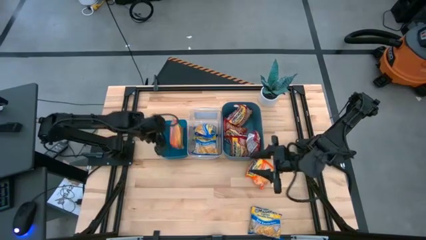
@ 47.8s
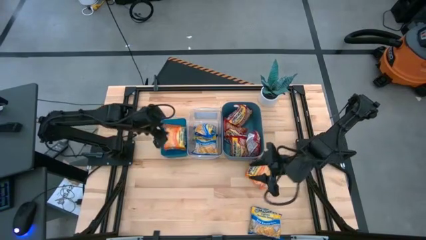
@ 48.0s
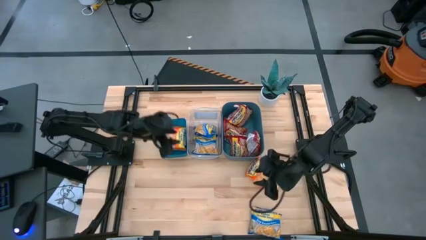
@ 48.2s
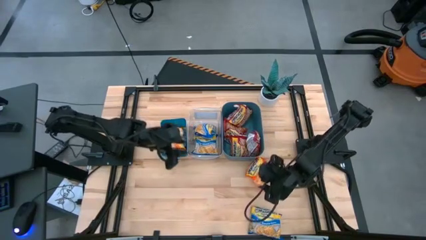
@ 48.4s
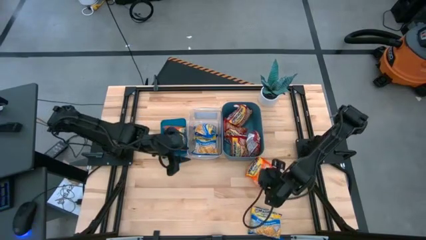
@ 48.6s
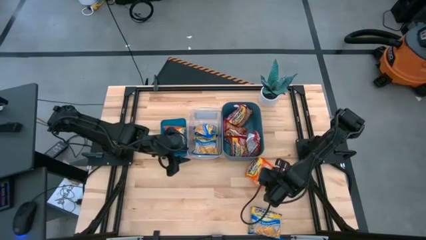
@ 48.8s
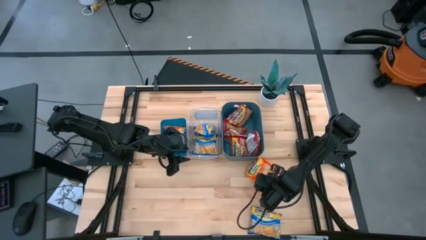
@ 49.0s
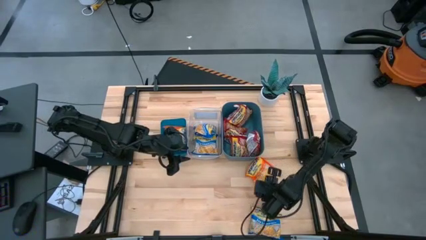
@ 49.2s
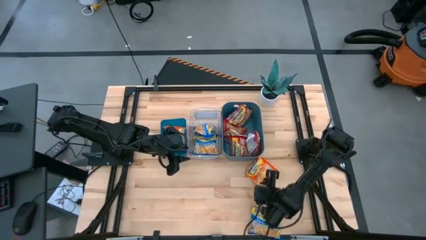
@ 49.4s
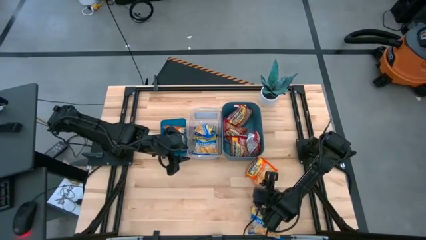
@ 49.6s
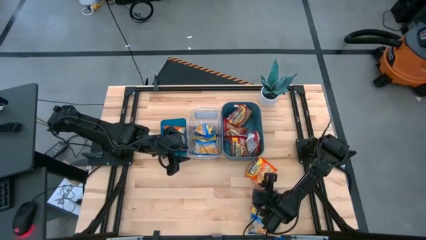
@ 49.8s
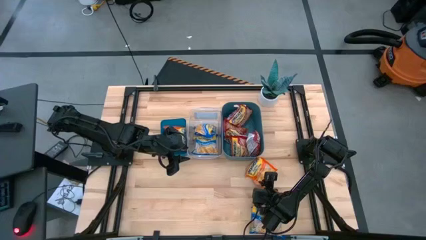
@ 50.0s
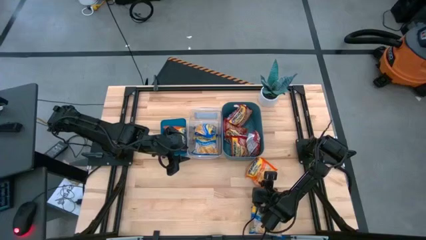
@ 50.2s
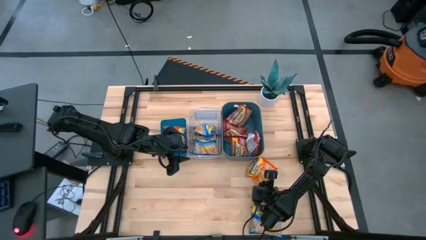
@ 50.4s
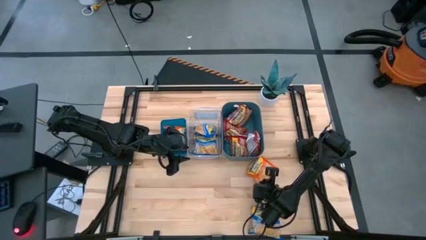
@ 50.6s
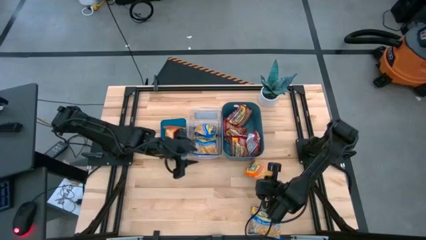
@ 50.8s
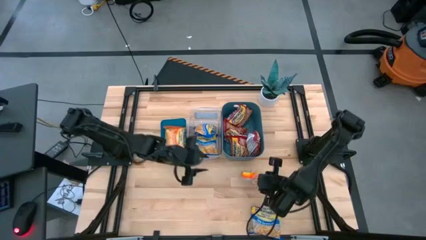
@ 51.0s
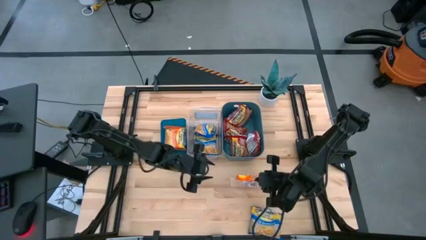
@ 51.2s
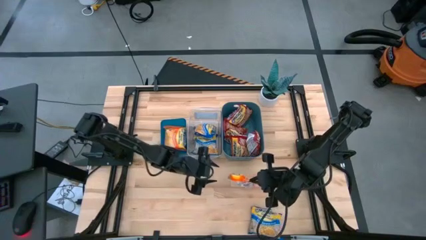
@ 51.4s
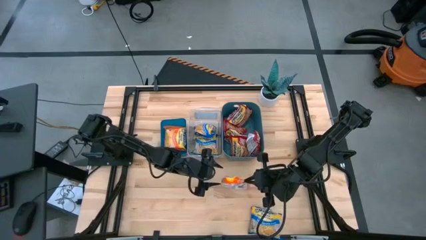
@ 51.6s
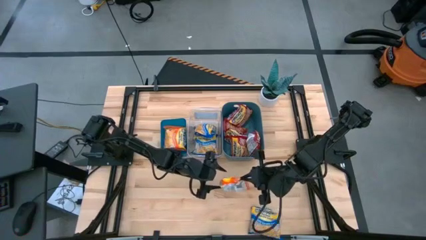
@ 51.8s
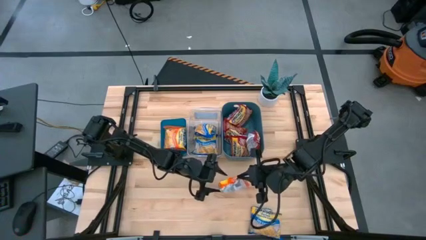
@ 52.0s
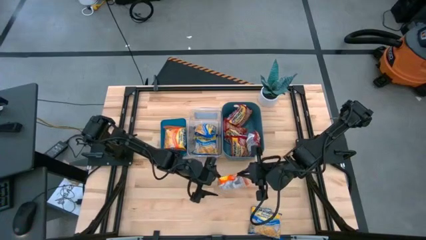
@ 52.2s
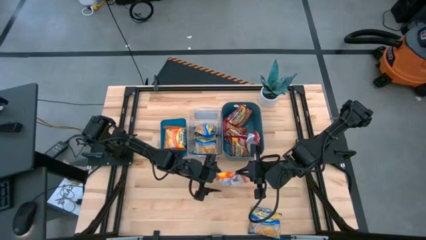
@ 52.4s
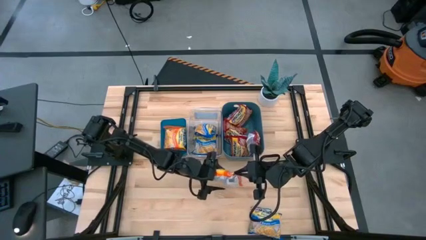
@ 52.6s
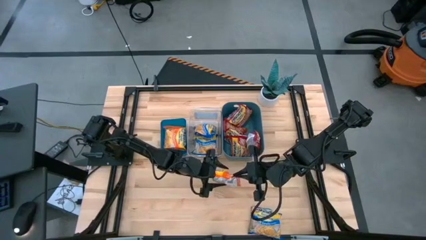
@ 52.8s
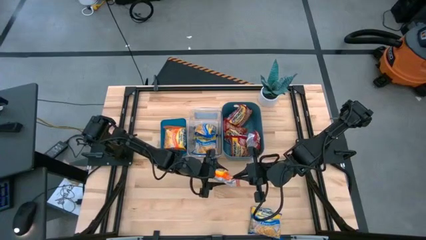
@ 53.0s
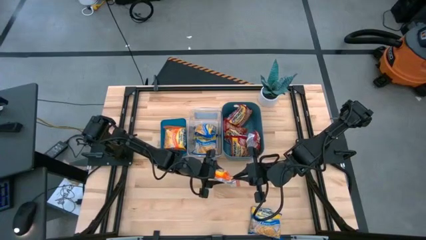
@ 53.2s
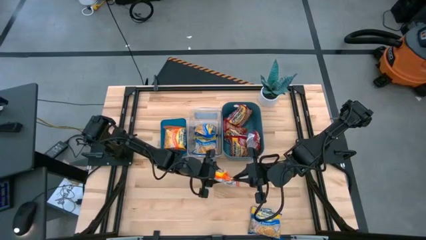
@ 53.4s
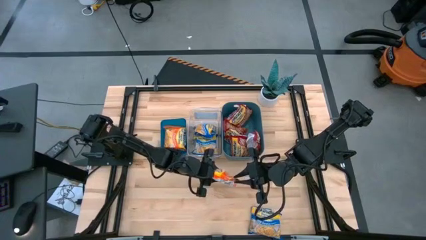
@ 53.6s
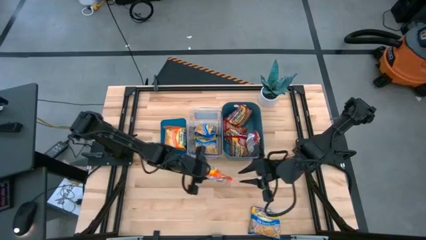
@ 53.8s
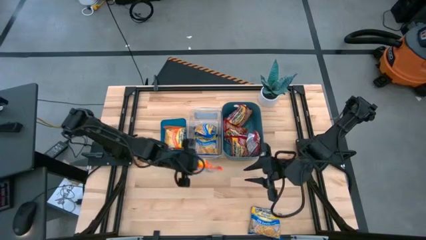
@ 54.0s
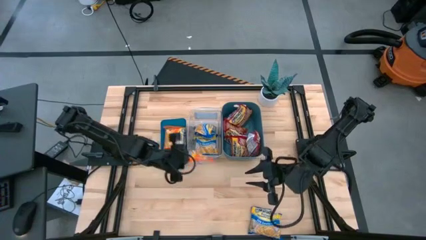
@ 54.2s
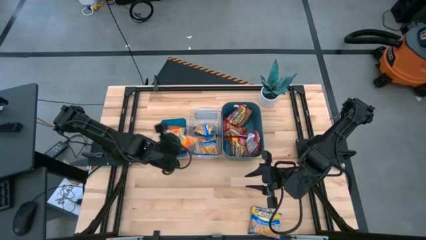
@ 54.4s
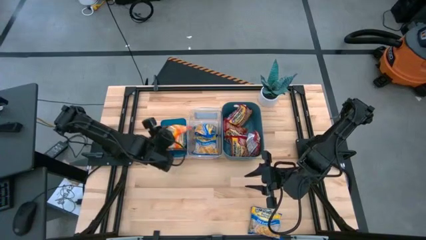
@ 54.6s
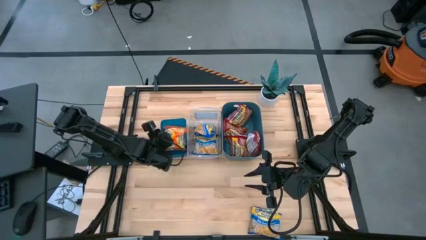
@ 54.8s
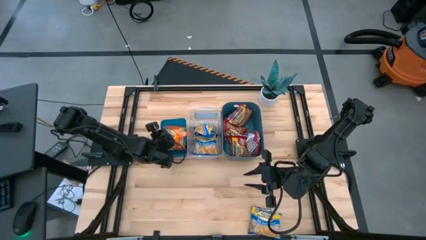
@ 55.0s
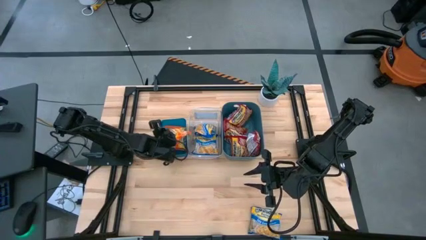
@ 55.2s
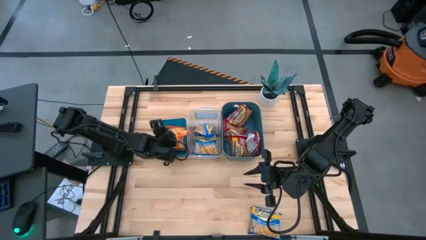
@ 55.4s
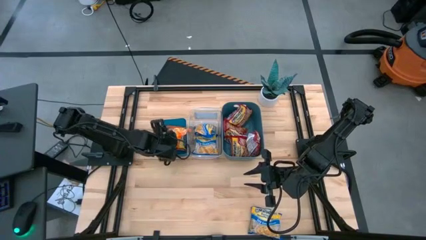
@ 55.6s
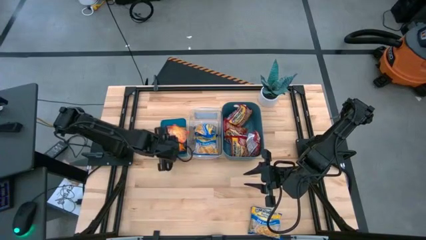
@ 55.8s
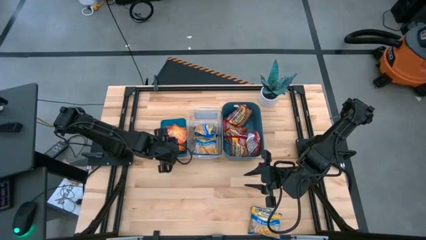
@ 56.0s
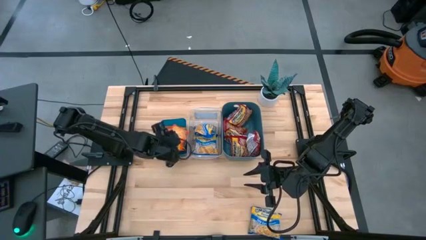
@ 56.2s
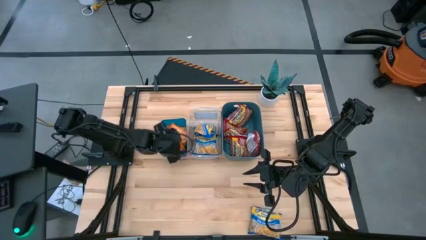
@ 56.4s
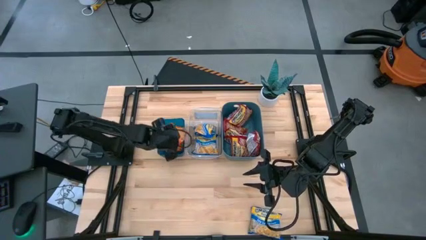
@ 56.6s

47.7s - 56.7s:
Task: Sort Maruchan noodles
Put the orange noodle pack into the left blue bin

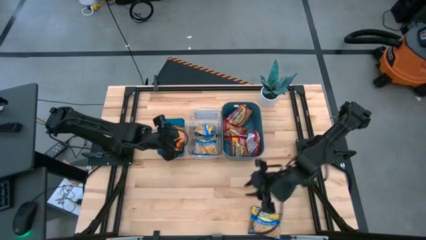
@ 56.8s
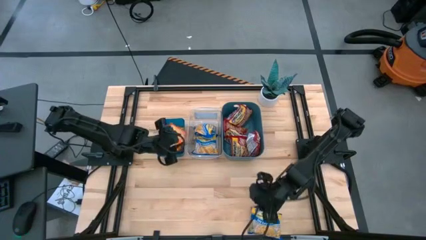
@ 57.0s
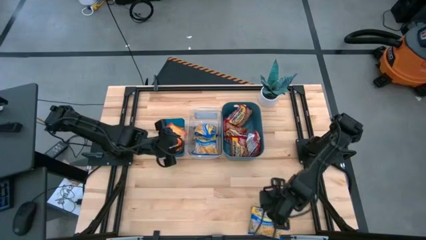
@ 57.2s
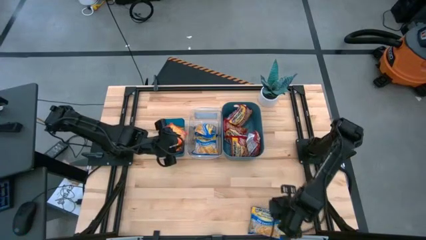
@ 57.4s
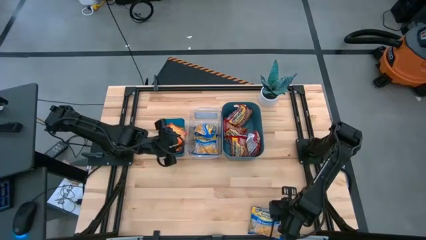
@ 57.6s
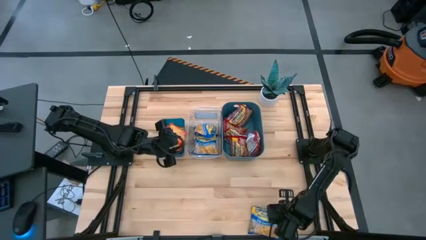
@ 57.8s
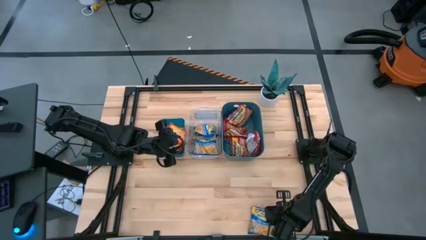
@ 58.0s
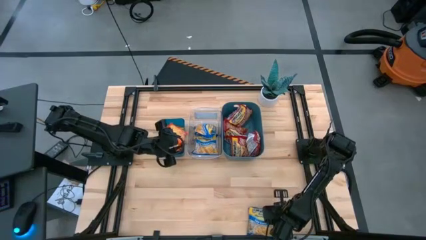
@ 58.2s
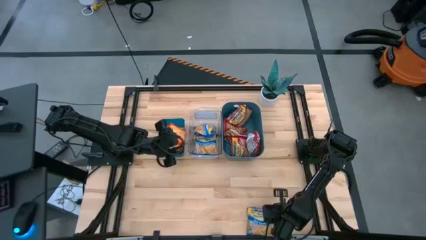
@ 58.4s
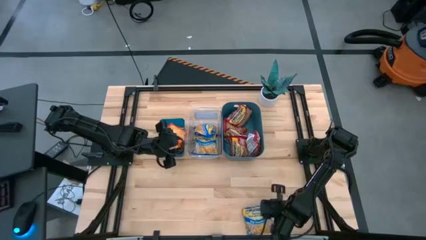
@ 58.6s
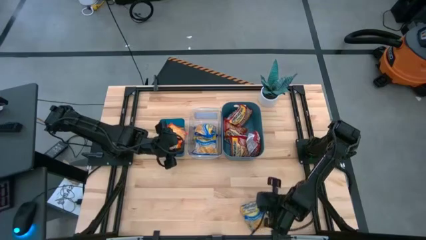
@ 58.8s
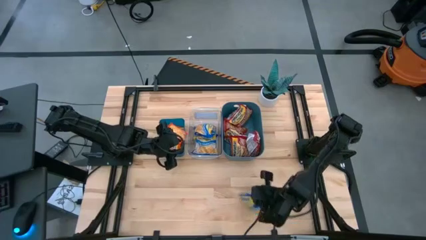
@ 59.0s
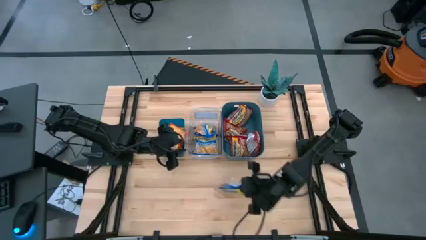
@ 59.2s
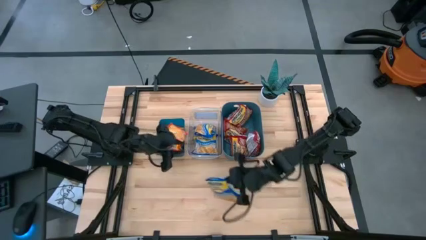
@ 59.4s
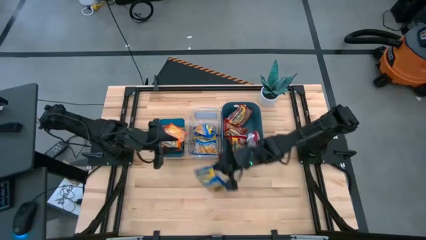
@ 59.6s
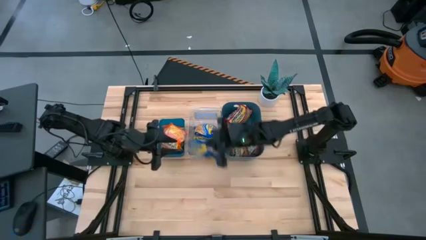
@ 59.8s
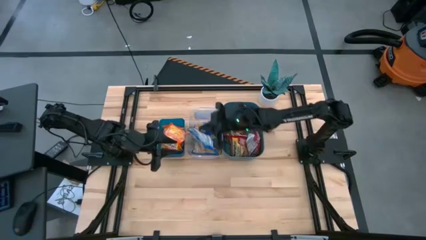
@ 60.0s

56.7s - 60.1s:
Put the blue noodle pack into the transparent bin

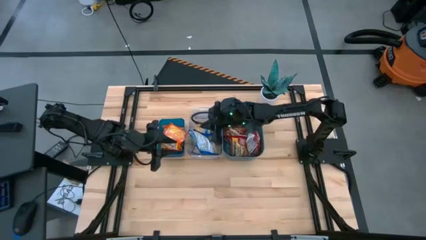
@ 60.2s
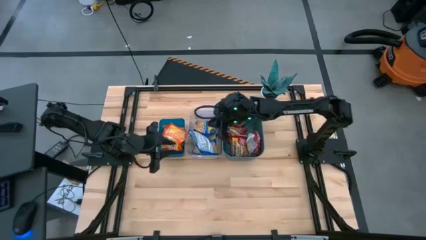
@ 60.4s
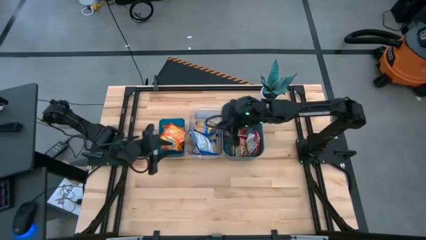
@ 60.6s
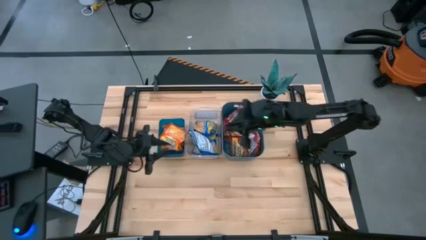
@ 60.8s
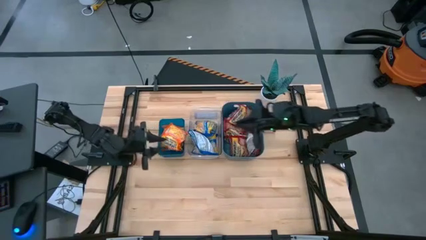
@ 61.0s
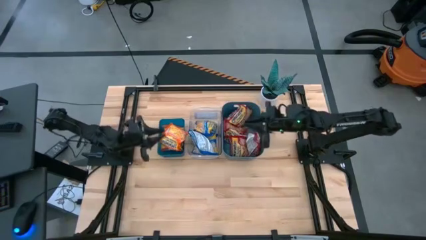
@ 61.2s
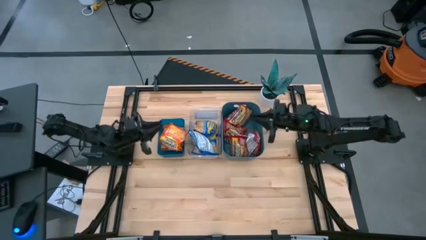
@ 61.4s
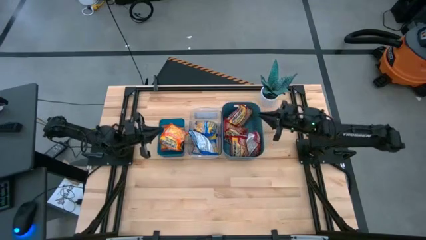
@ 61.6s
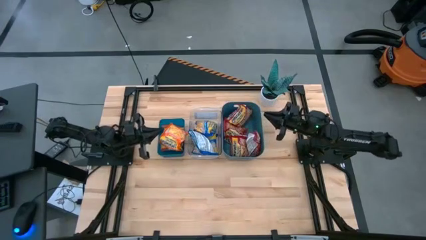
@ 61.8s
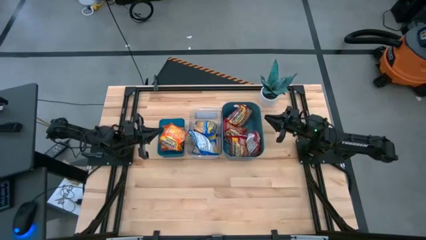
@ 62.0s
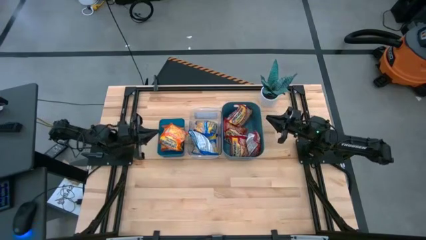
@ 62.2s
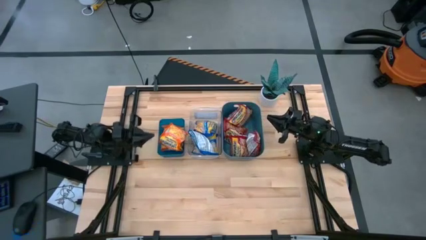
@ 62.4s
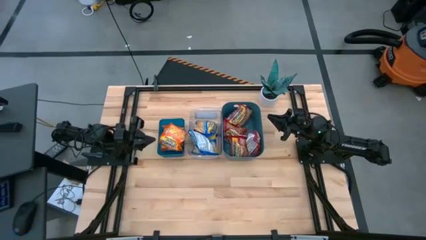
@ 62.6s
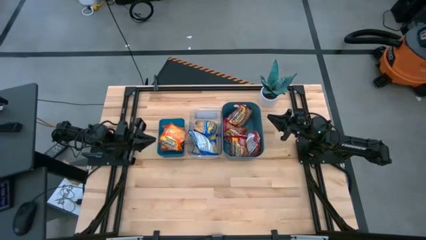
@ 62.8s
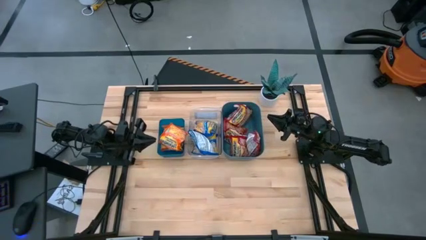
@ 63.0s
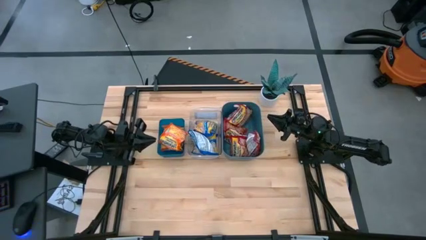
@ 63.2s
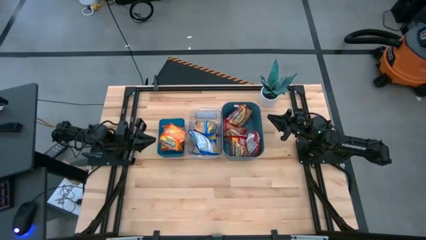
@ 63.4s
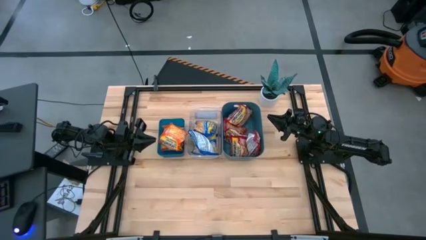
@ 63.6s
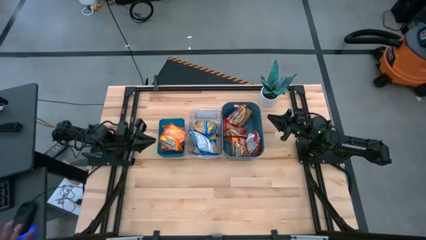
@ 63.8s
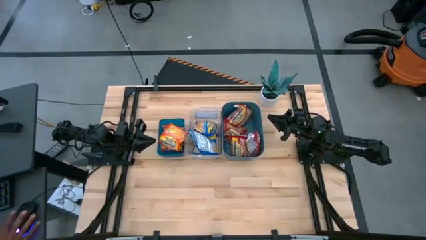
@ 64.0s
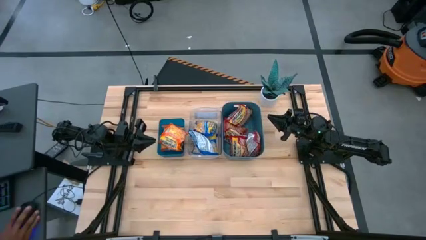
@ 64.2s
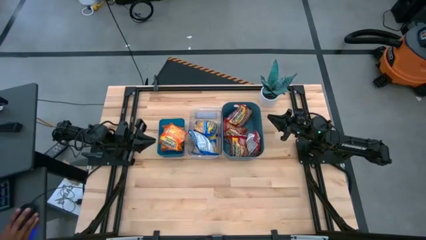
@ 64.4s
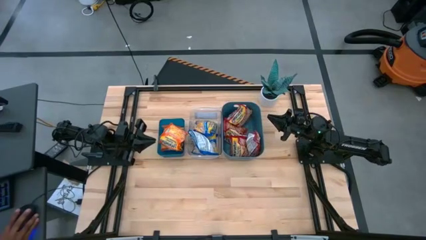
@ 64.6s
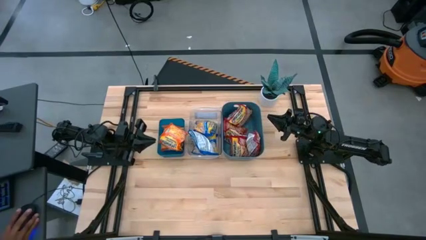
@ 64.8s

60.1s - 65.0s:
Return to Home Position
